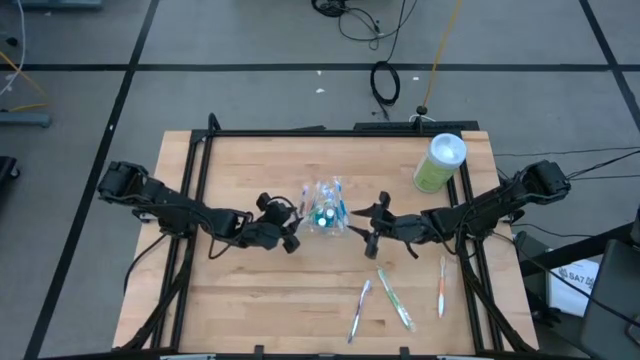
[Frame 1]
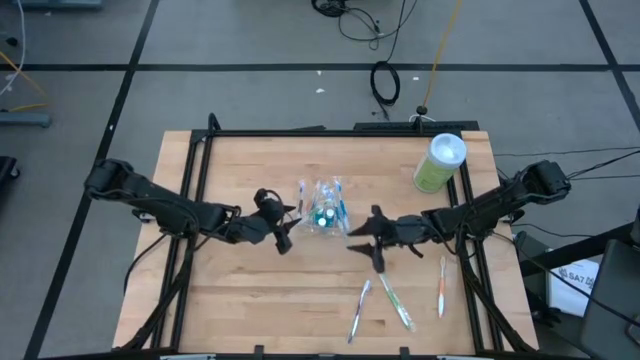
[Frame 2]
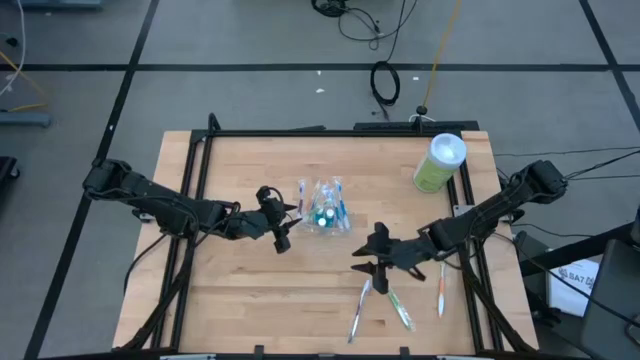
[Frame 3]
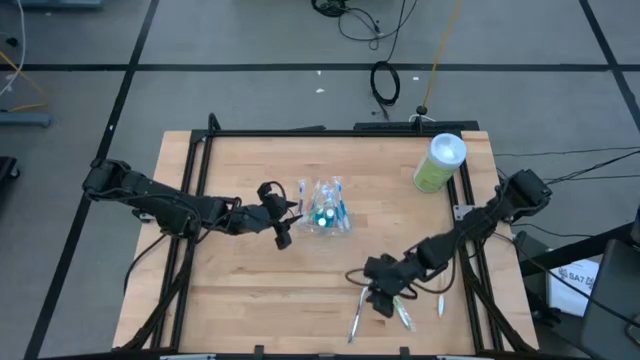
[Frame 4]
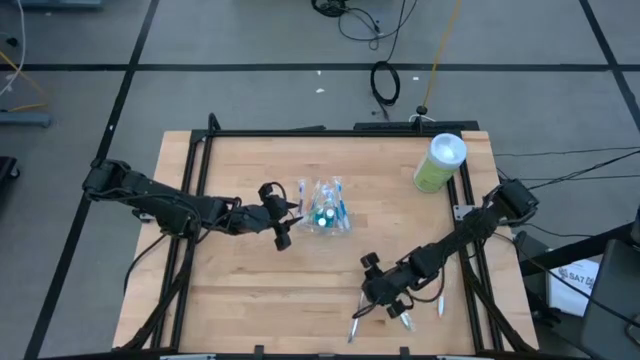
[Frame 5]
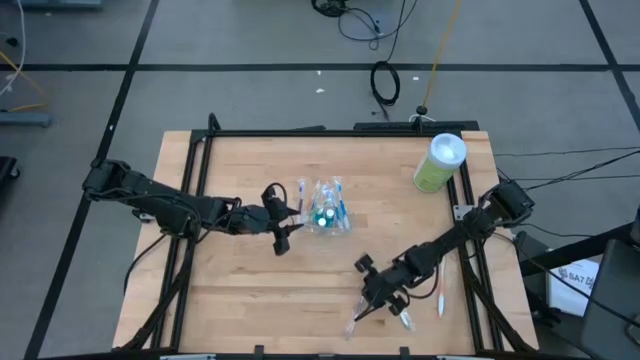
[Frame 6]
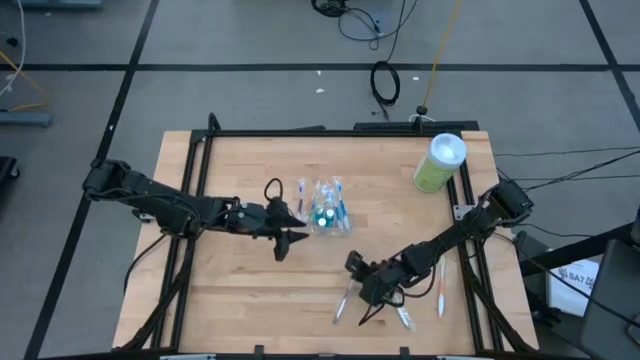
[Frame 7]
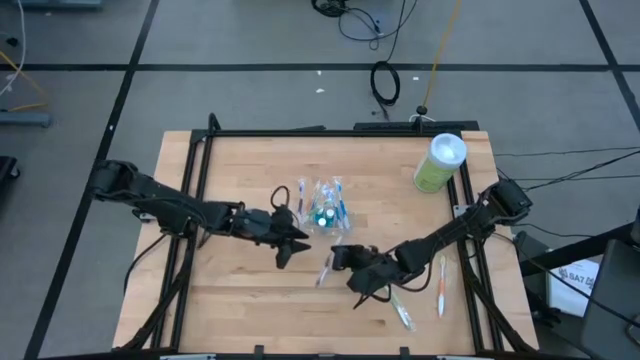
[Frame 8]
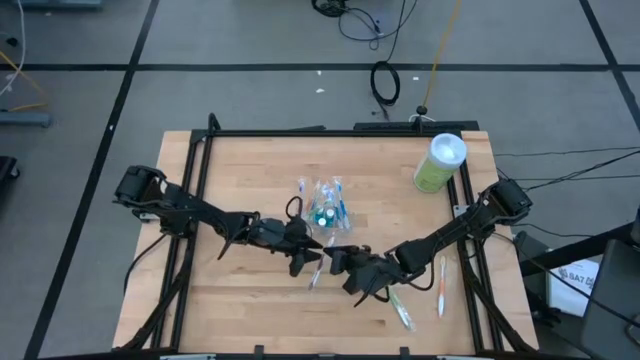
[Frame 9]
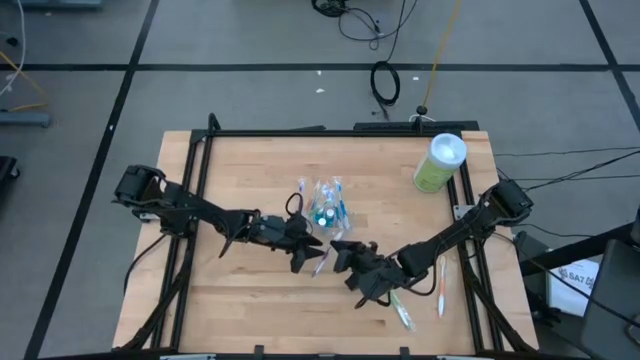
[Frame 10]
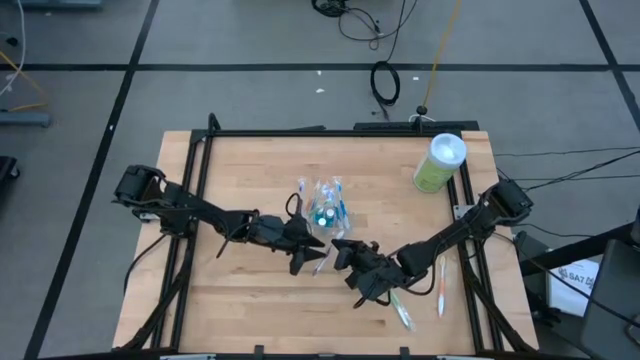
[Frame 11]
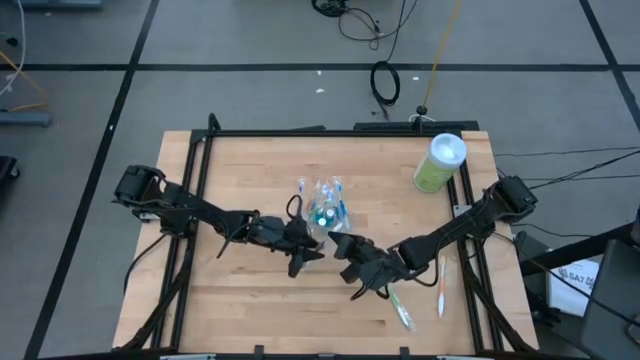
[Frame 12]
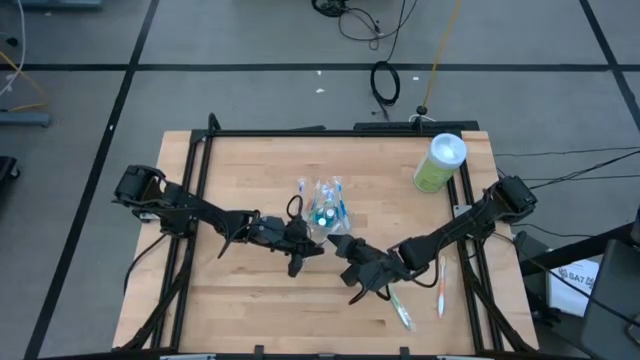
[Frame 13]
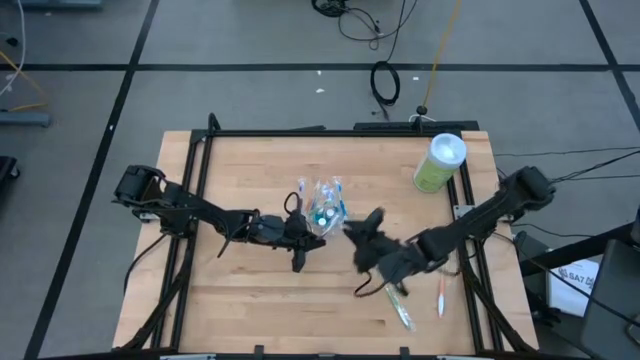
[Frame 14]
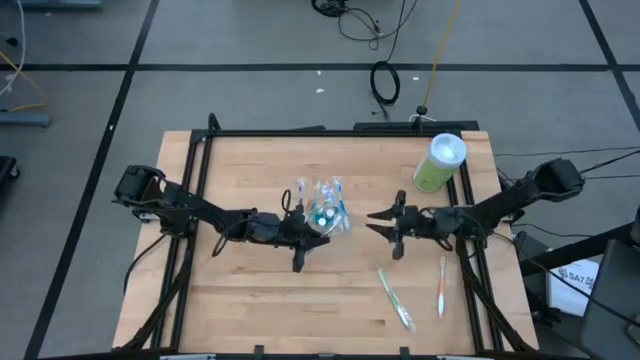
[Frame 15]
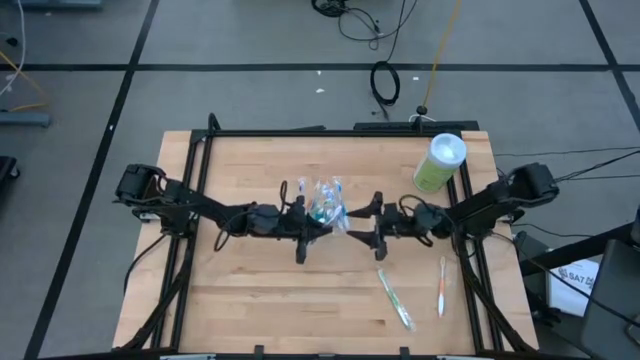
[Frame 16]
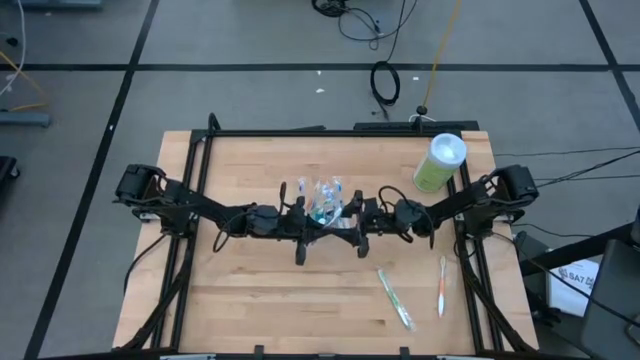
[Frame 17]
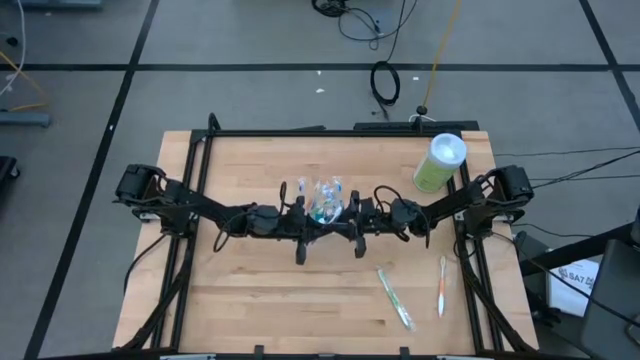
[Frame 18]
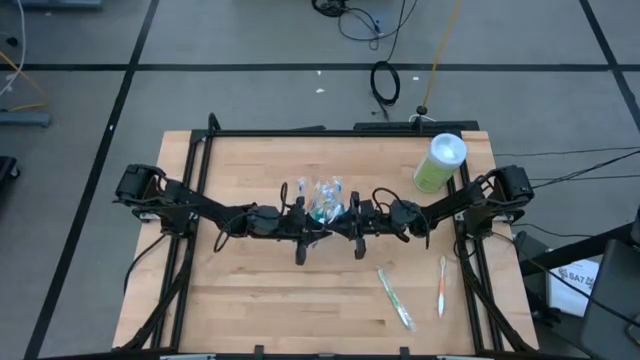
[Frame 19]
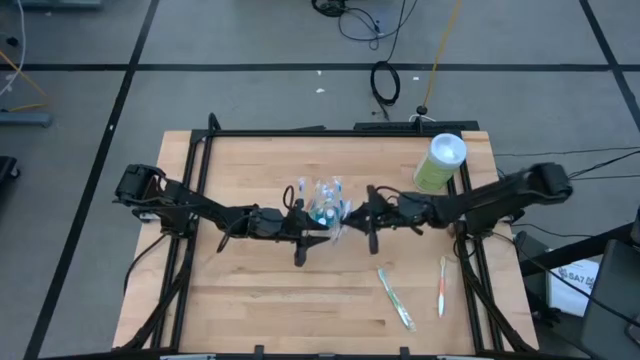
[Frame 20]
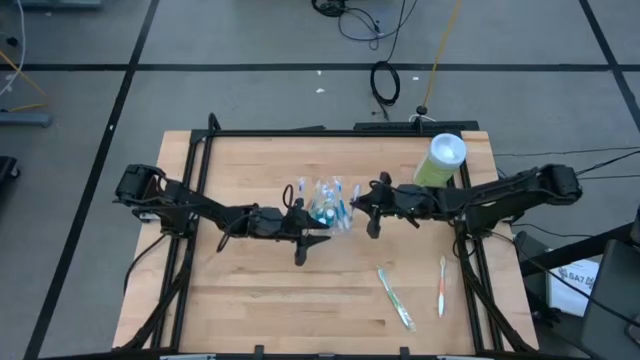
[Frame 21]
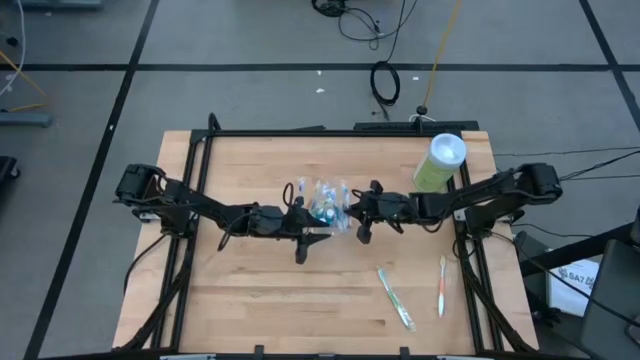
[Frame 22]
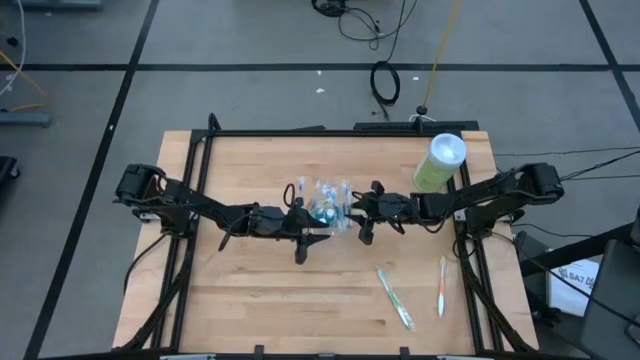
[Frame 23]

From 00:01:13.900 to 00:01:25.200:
Task: Pick & Place toothbrushing station
Put the purple toothbrush into the transparent organizer

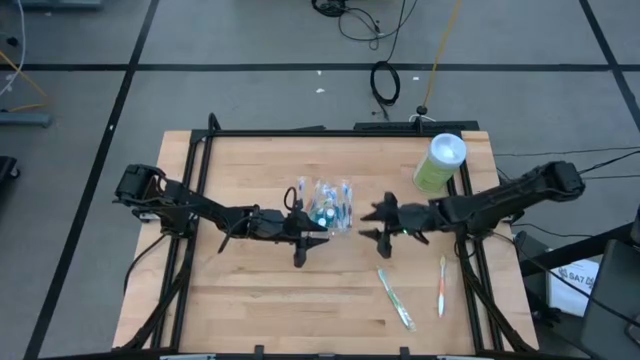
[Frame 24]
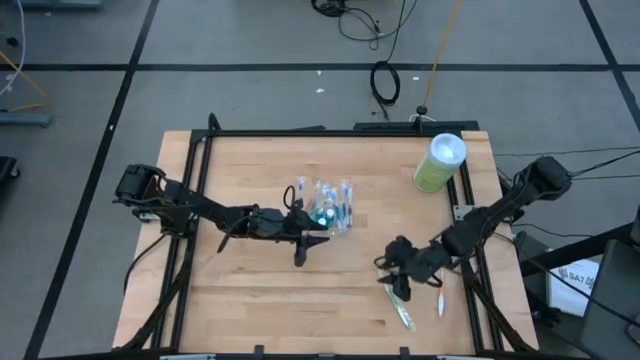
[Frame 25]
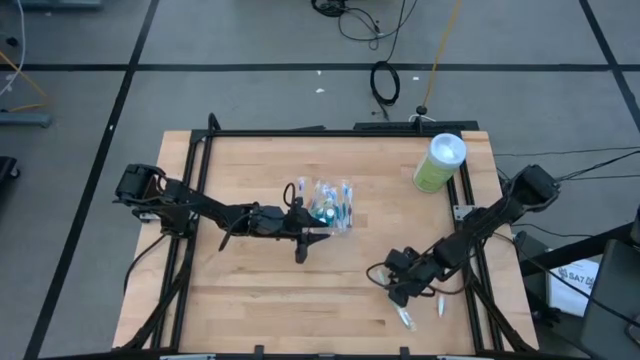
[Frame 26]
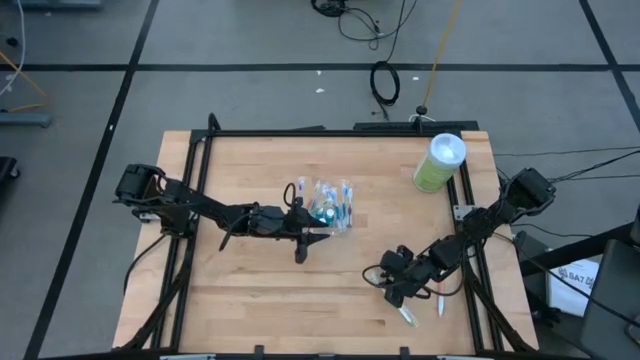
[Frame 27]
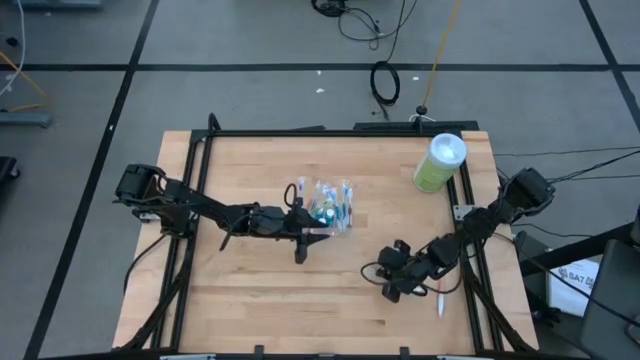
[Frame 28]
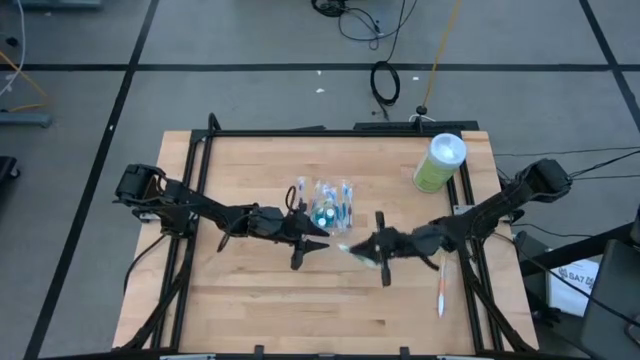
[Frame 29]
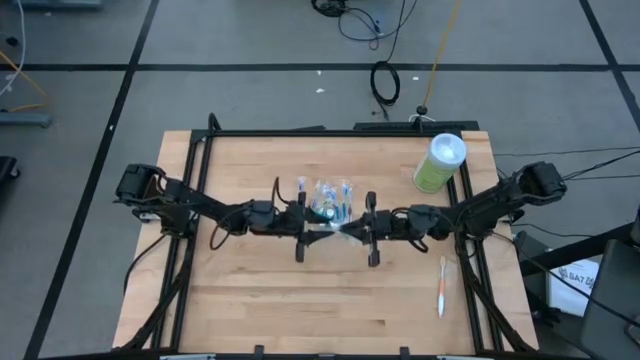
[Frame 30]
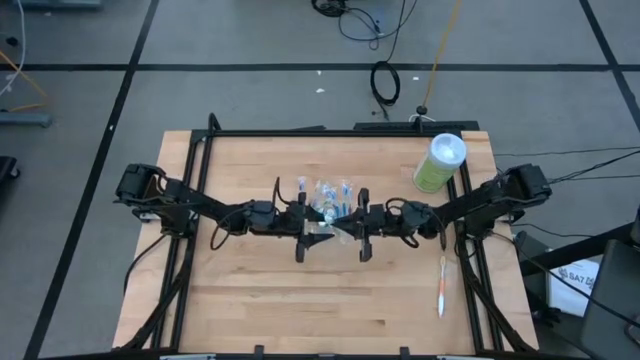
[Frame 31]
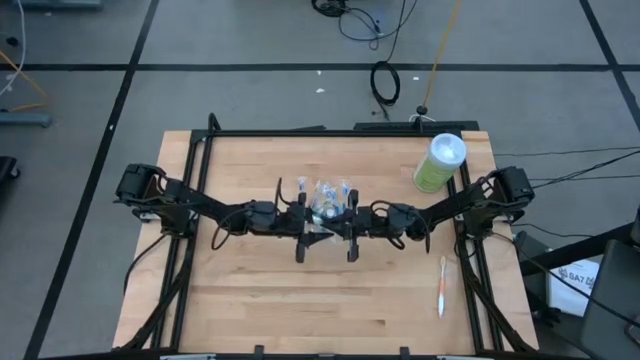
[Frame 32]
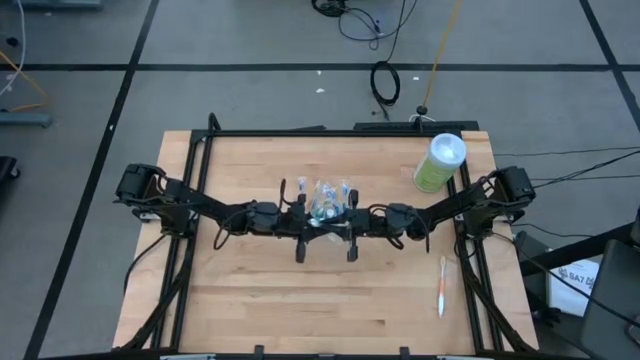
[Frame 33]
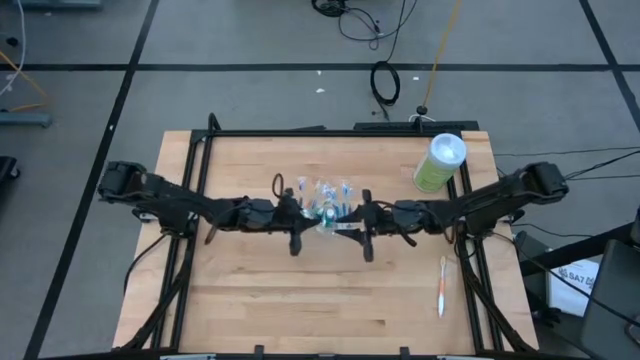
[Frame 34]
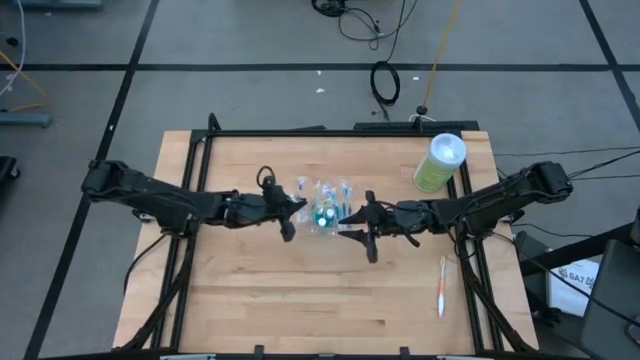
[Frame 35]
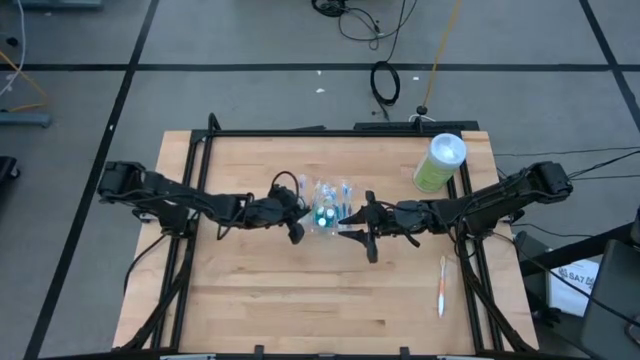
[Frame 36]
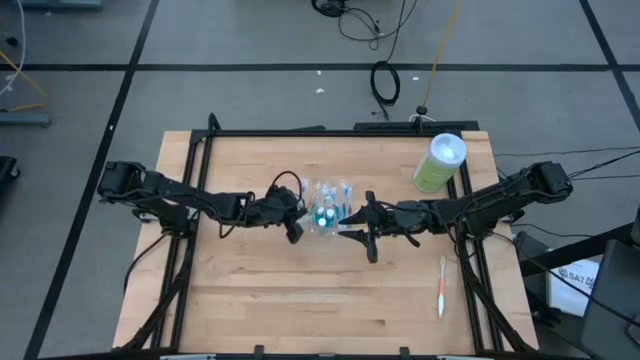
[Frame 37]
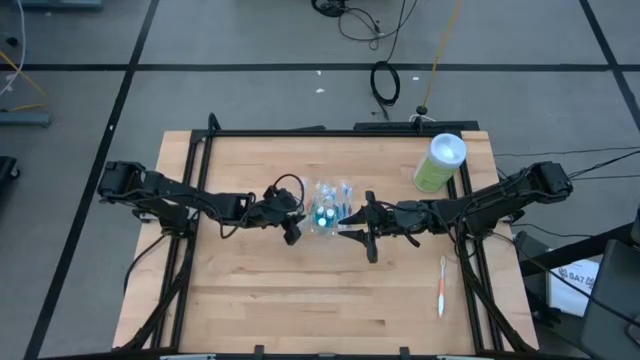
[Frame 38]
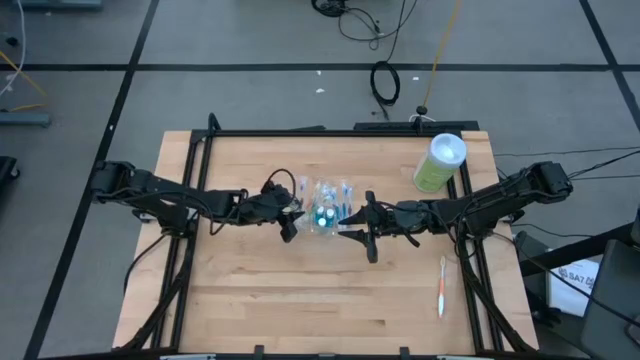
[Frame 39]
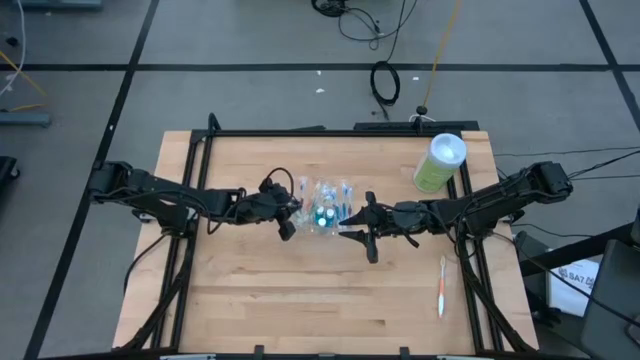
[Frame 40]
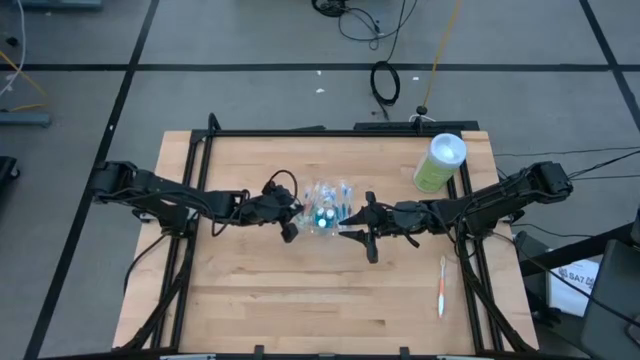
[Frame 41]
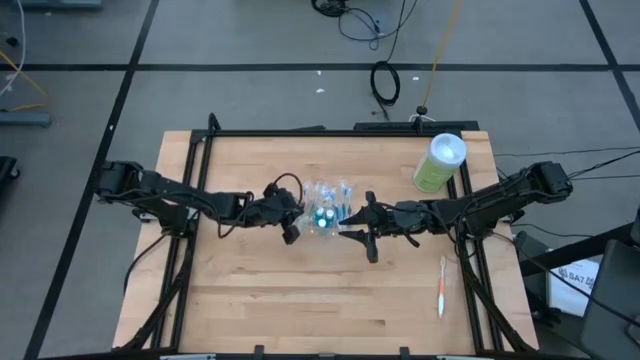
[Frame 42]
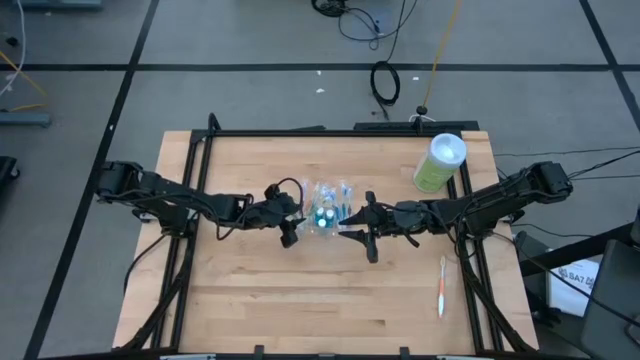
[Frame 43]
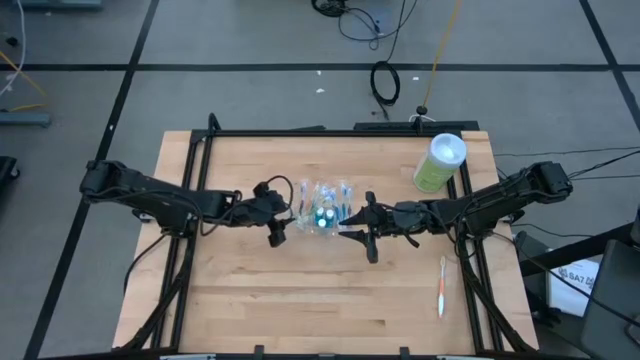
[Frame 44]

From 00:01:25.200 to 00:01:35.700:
Put the green toothbrush into the transparent organizer

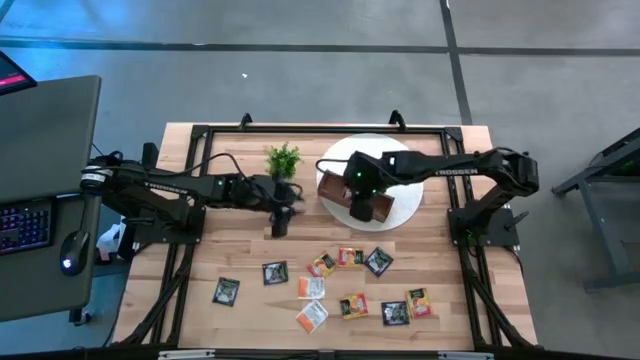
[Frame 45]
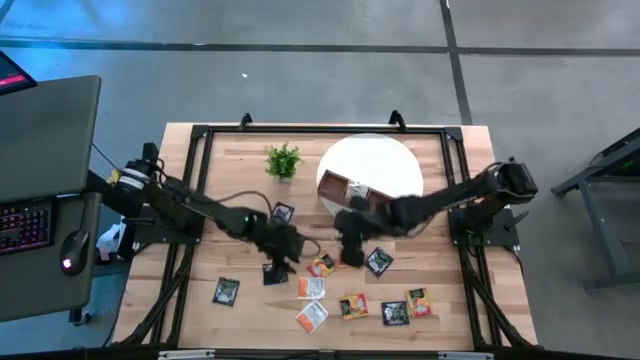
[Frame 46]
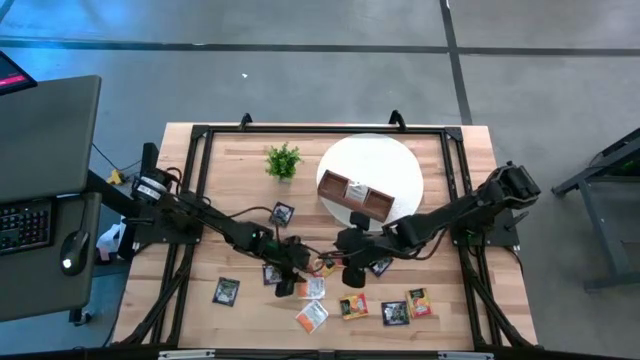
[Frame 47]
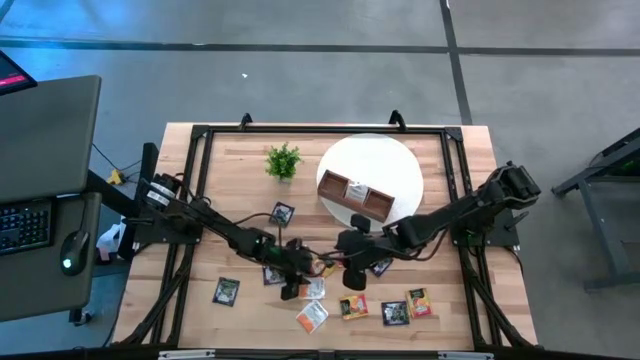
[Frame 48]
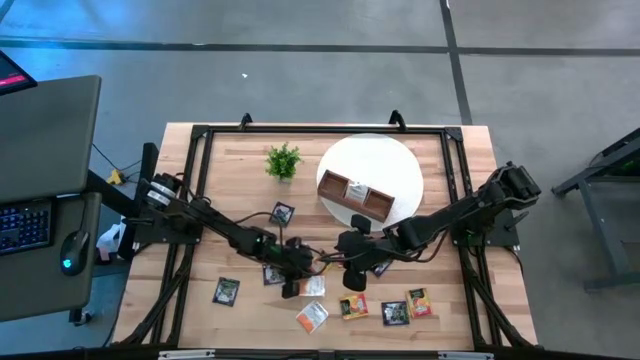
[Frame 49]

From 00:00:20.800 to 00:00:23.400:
Task: Pick & Place Tea
Put the white tea bag into the middle compartment of the wooden organizer
